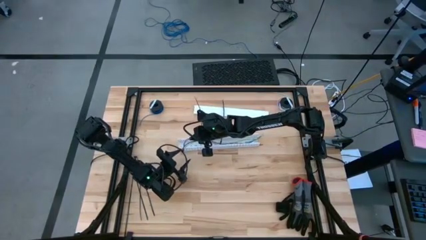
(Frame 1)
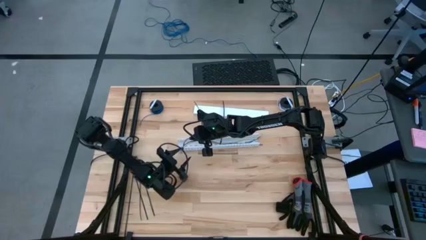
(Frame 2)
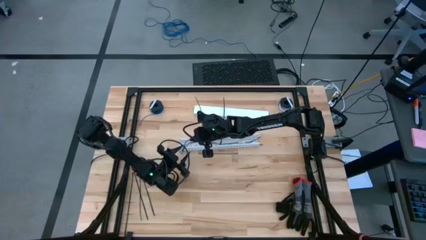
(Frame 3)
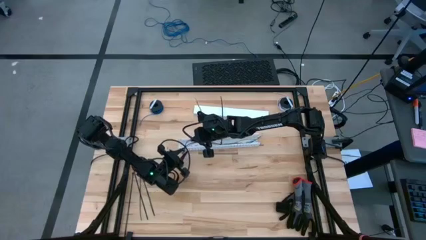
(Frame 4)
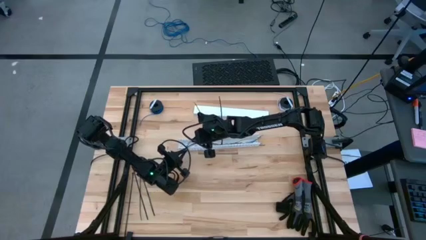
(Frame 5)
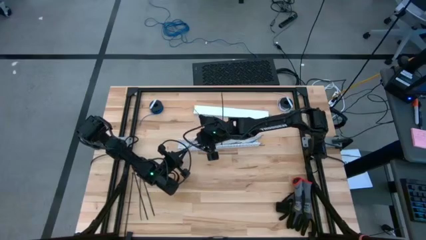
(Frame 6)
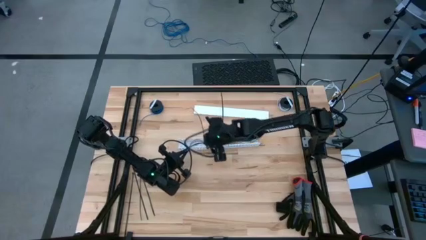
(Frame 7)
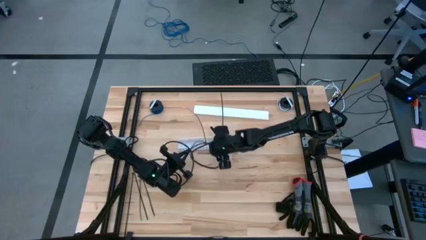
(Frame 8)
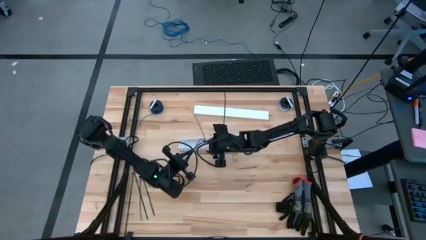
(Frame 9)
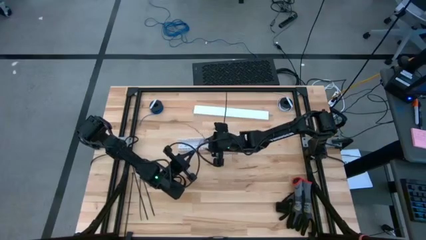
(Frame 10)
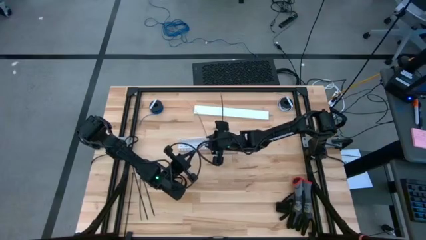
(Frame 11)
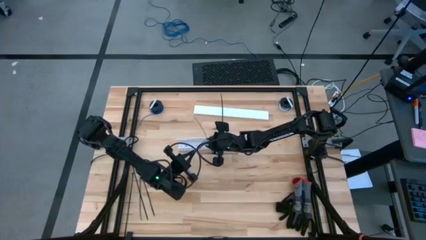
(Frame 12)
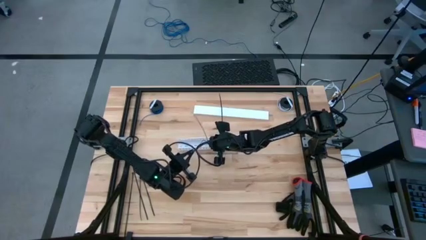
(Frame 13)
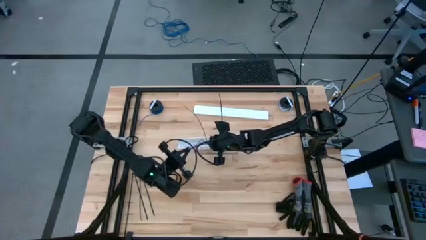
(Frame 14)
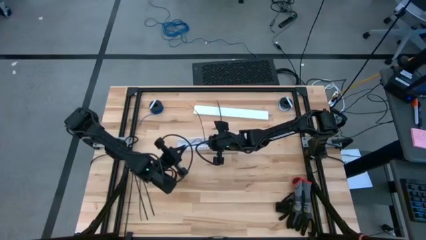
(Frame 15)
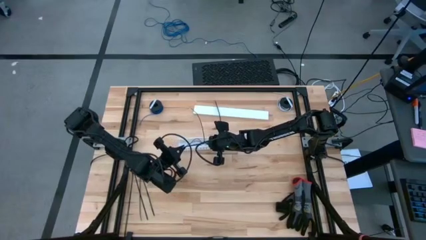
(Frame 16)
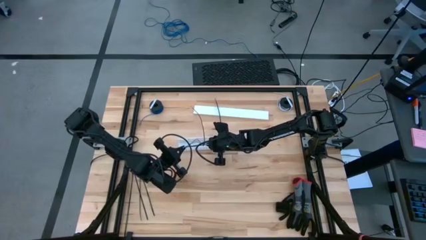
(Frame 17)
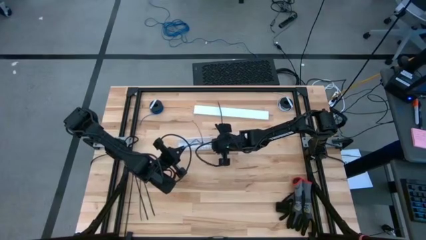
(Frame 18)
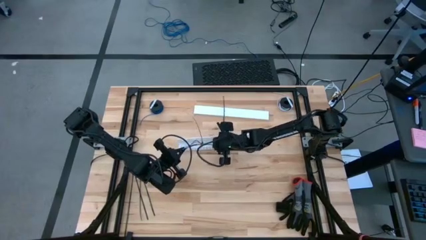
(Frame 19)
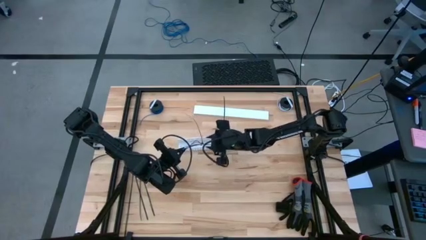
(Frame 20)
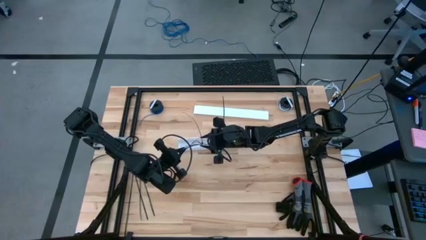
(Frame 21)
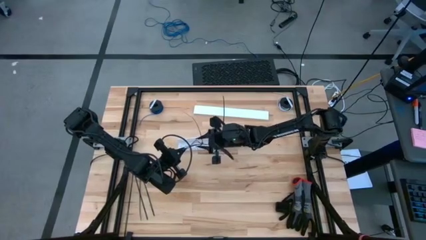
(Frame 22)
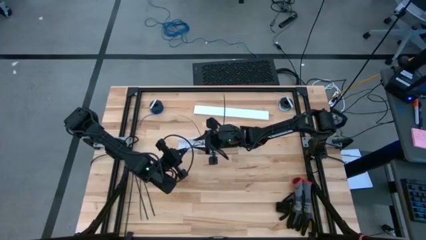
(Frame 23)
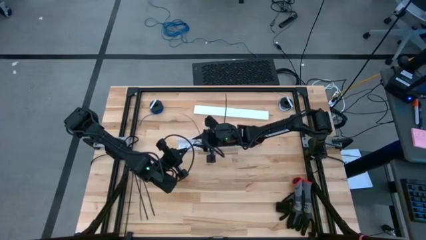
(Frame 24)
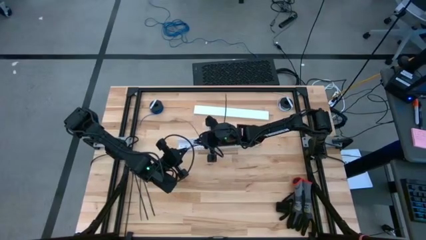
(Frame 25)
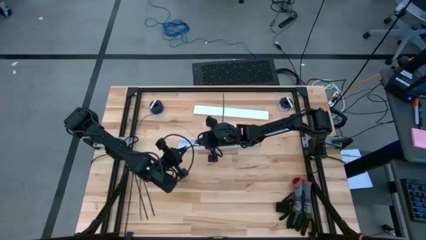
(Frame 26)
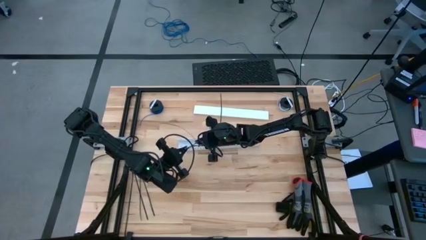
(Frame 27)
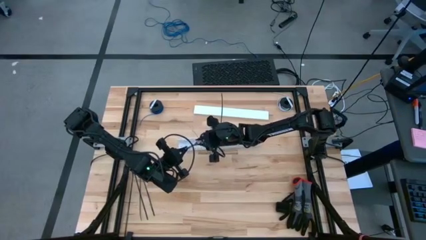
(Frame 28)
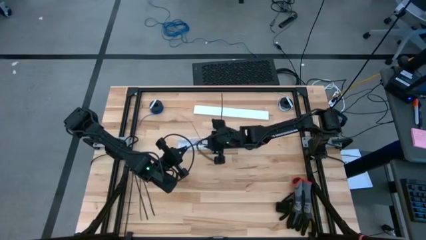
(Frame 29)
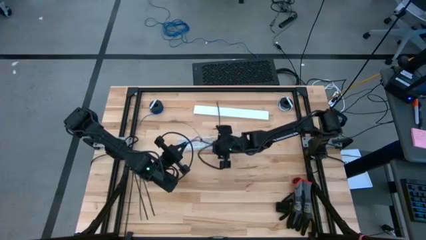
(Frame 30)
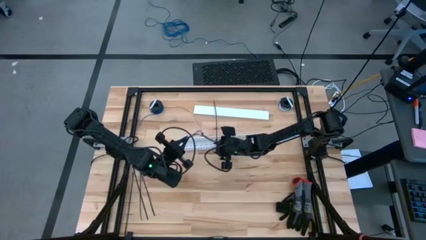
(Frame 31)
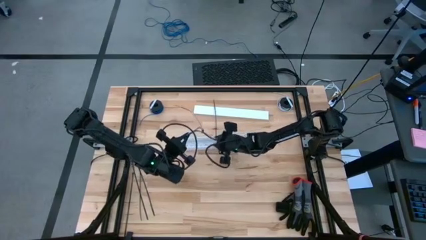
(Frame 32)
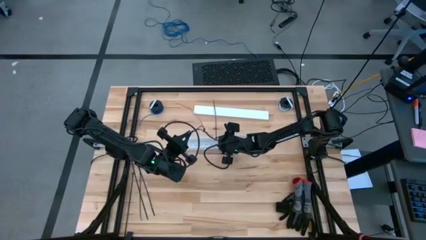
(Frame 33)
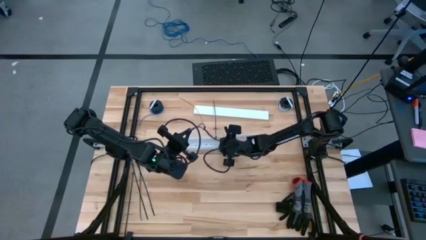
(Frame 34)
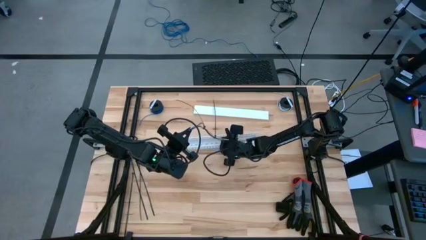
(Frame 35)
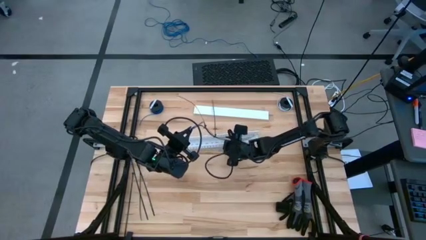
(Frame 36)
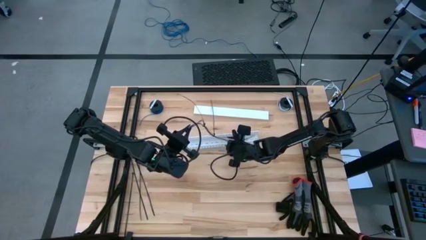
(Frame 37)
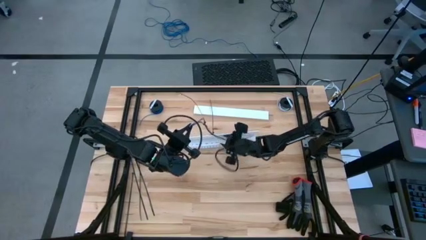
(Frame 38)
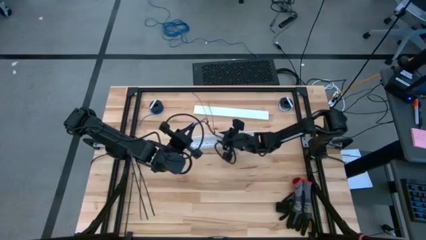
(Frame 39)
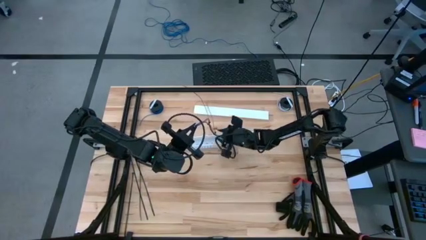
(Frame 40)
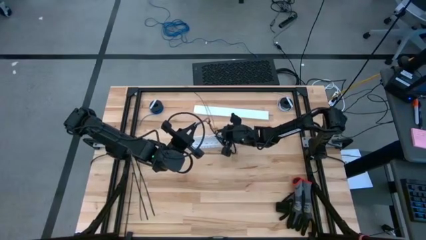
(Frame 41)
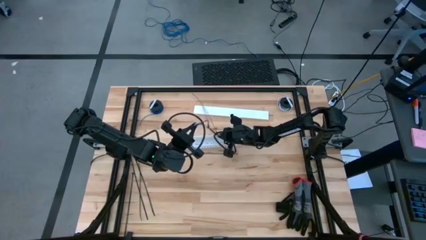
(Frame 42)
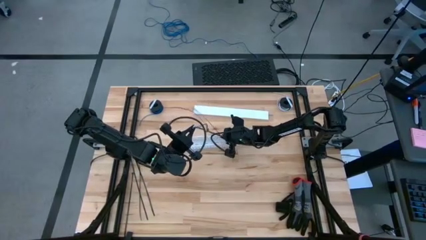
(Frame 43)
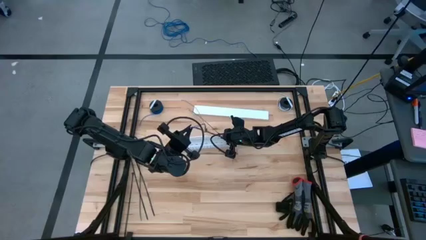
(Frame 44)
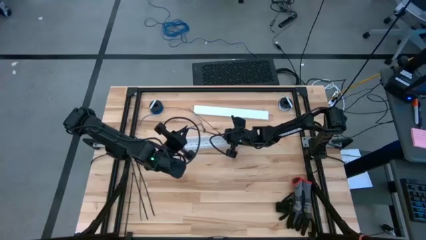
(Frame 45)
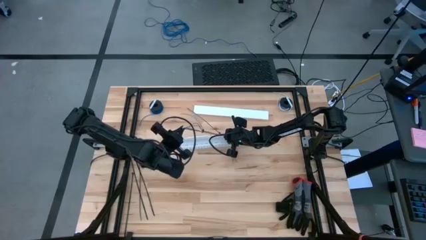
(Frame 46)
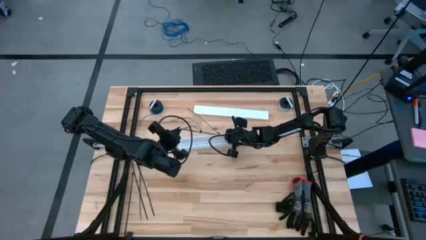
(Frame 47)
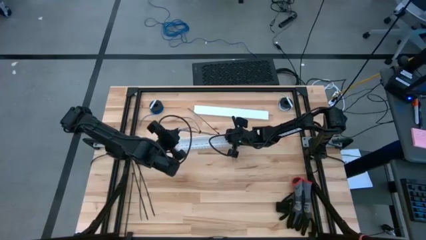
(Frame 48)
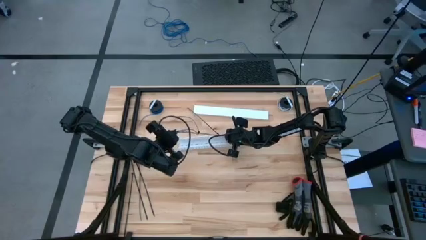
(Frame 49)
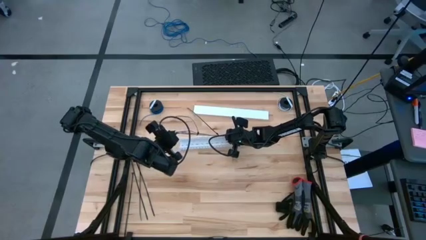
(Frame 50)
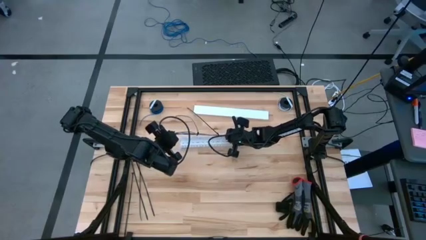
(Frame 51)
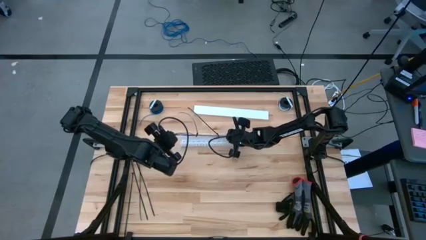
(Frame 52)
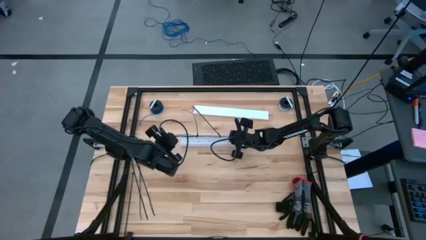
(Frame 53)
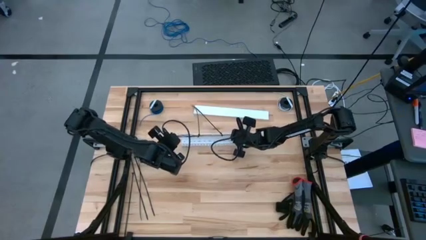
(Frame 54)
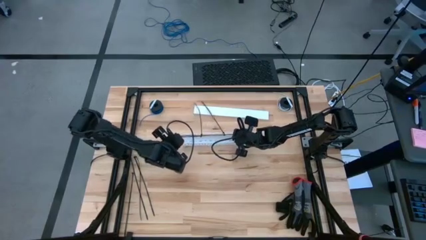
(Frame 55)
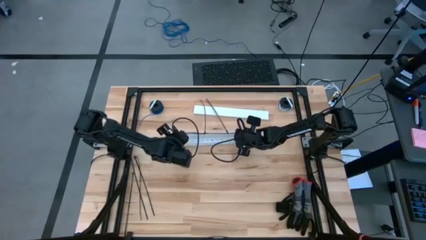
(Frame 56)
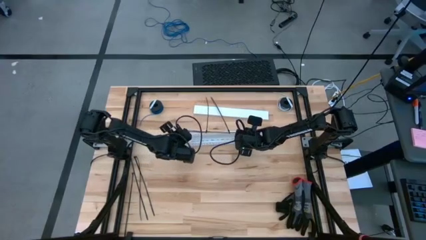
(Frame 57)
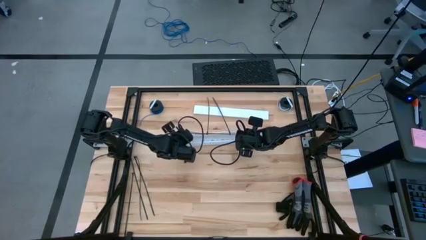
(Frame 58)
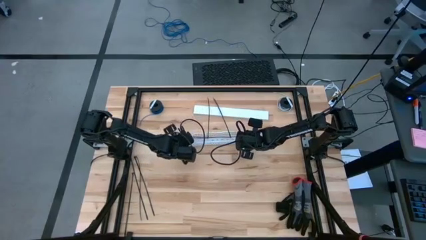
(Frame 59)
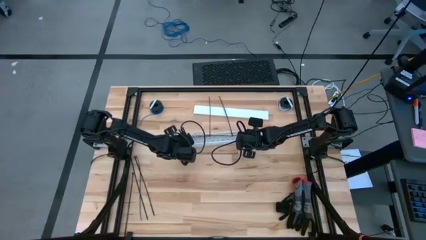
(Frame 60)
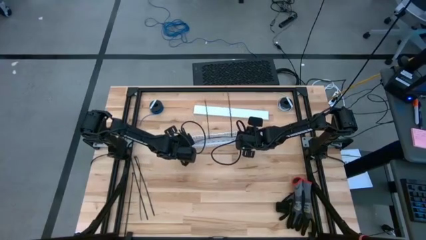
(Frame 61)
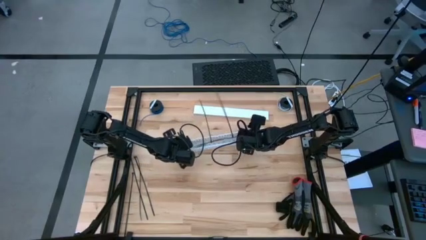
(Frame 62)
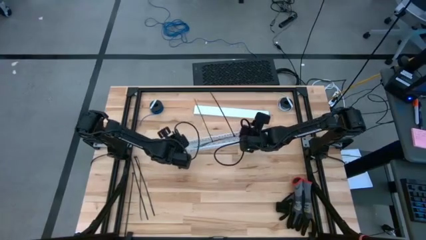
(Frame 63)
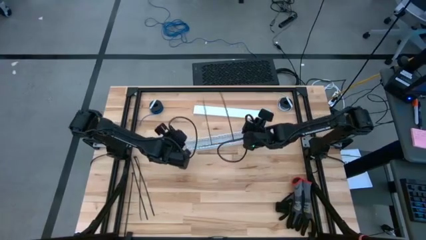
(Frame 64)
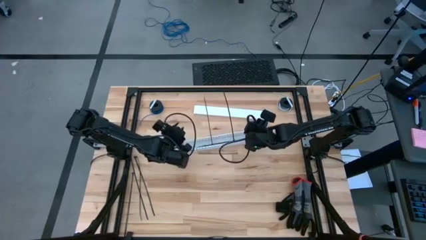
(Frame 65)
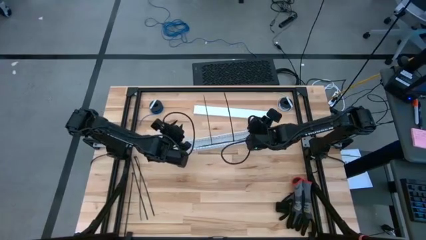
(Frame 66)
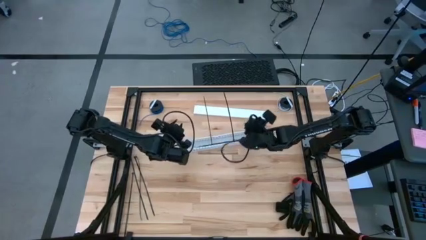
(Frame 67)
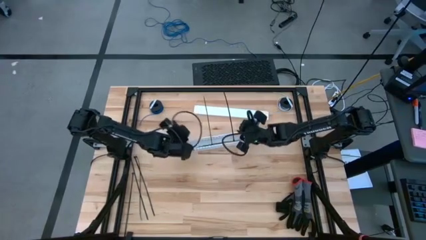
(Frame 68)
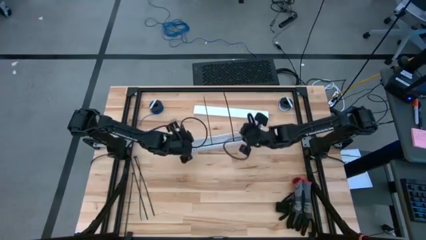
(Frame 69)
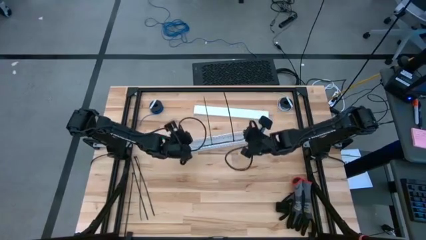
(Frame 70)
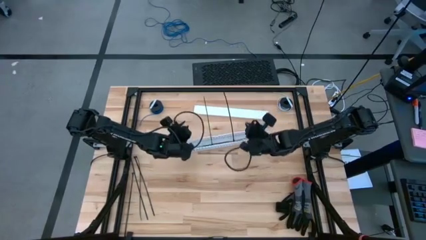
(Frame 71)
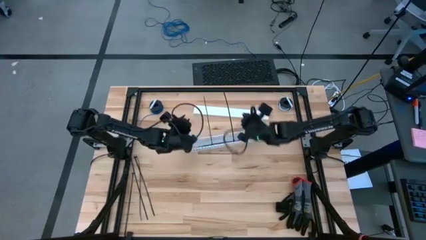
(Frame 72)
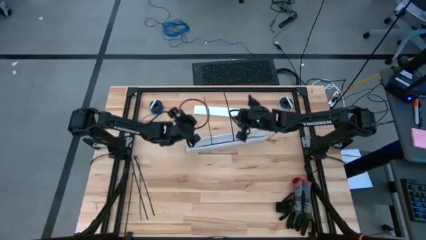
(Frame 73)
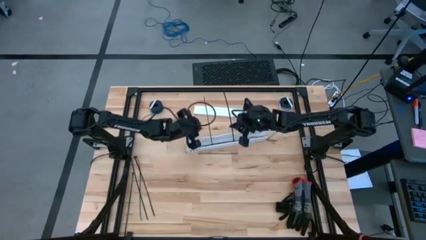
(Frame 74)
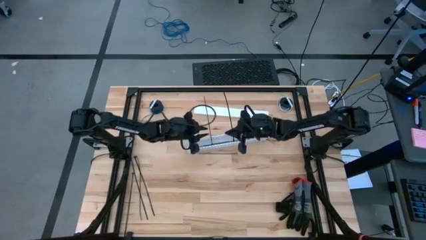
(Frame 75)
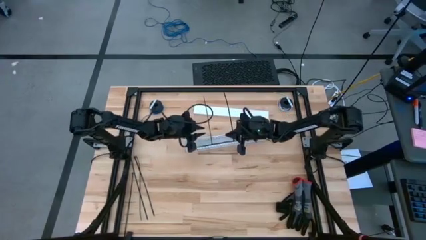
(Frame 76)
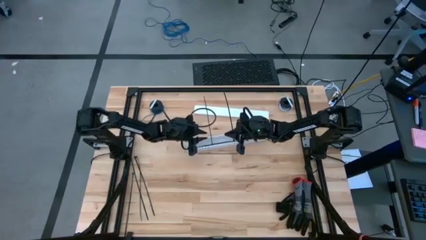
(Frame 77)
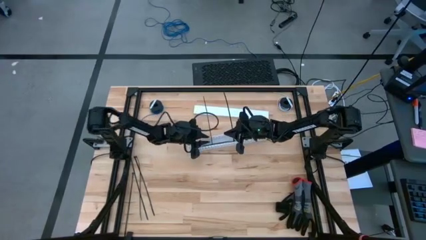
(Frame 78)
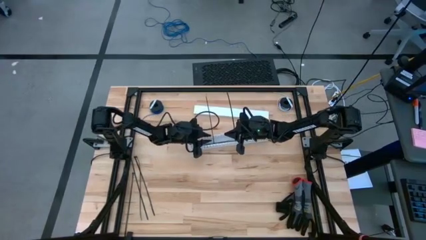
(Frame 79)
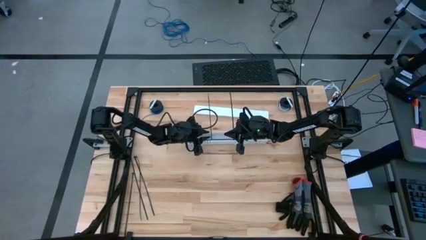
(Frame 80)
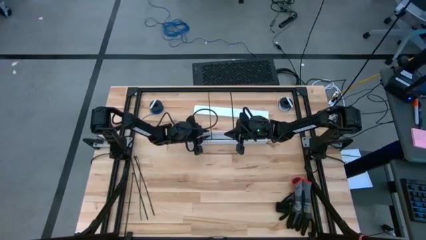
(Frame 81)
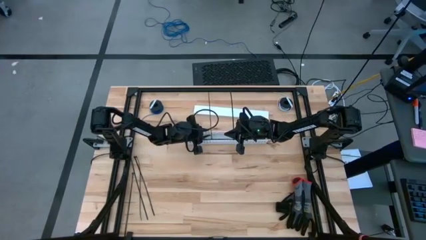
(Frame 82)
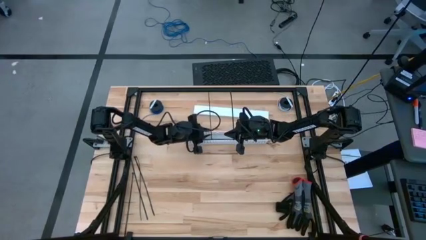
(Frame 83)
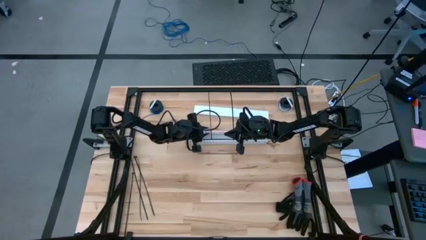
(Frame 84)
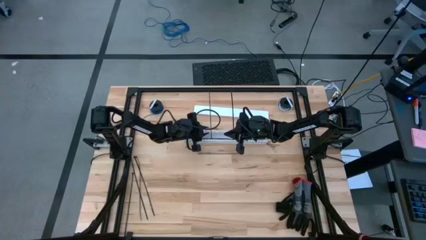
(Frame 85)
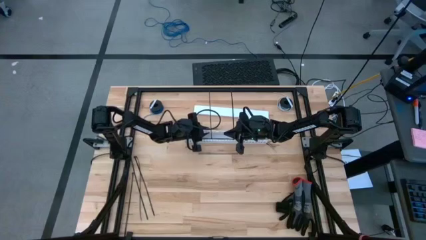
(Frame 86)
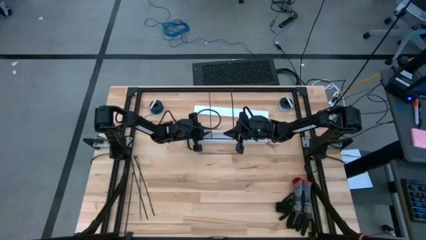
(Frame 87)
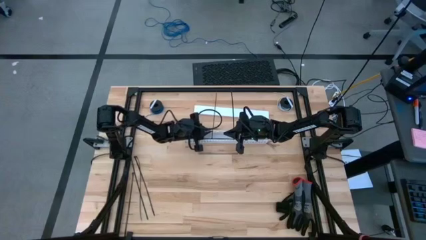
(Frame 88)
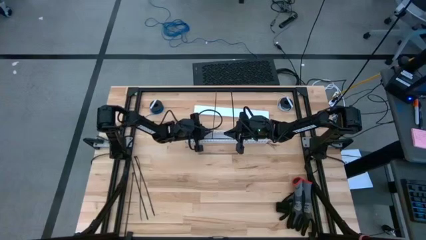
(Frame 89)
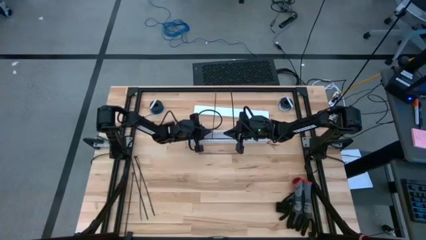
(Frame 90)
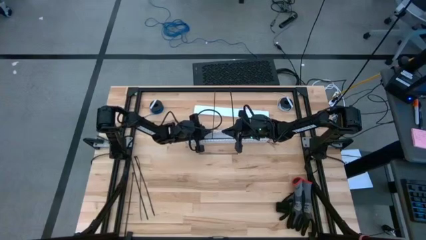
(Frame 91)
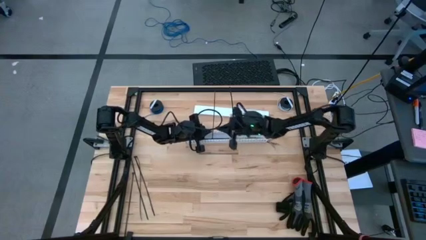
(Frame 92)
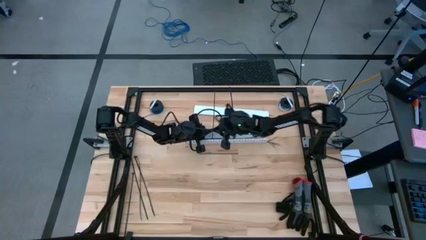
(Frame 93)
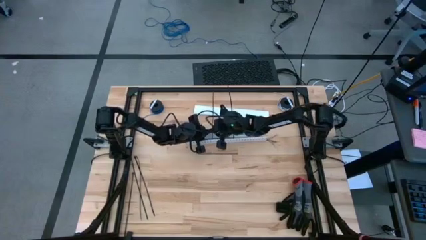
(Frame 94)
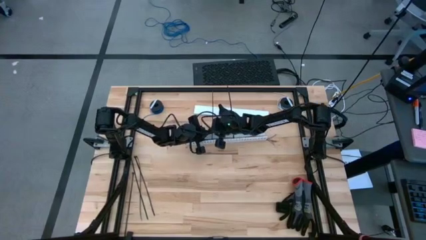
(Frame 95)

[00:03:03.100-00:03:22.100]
Task: Ziptie cables
Put the colored ziptied cables into the white cable duct
